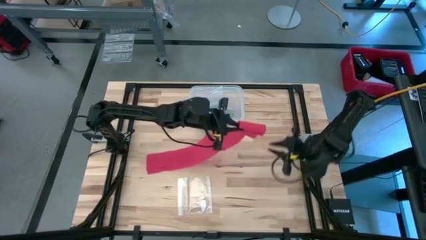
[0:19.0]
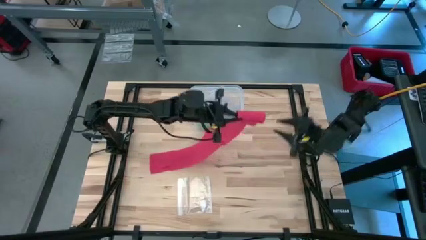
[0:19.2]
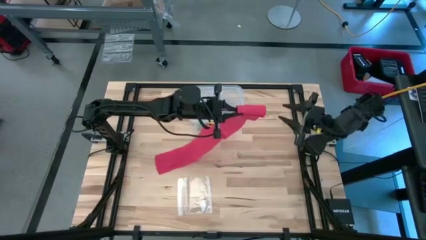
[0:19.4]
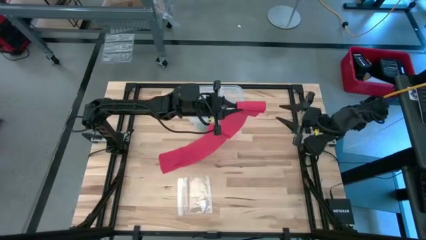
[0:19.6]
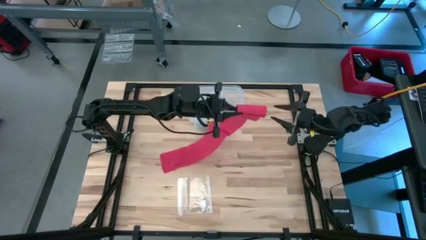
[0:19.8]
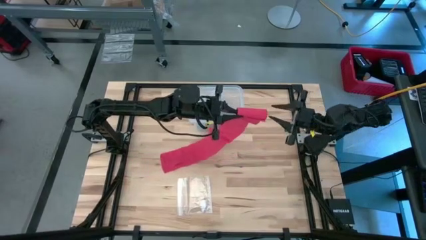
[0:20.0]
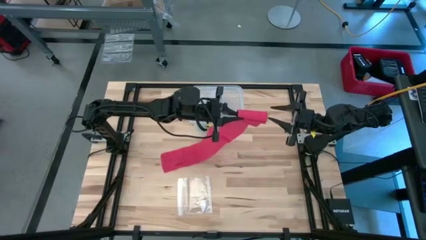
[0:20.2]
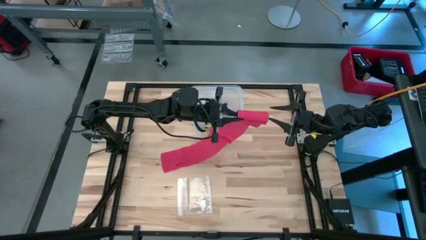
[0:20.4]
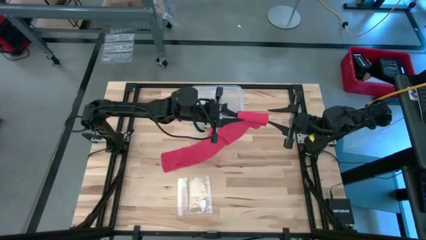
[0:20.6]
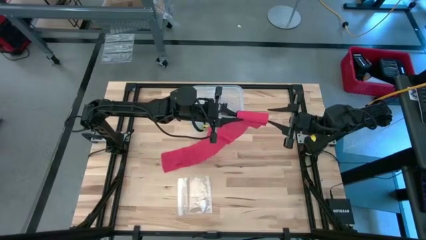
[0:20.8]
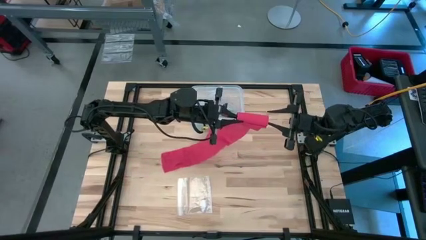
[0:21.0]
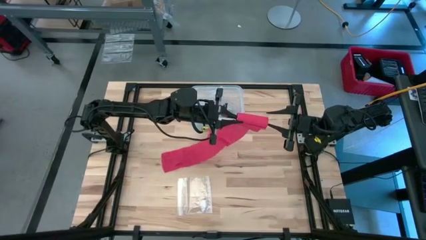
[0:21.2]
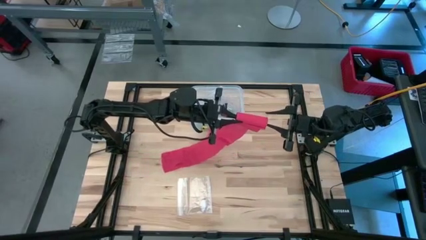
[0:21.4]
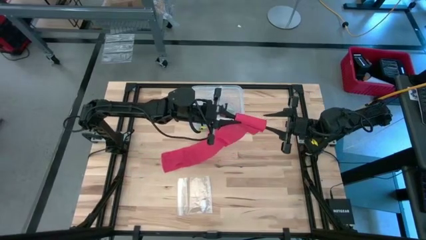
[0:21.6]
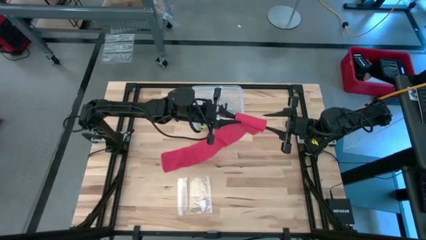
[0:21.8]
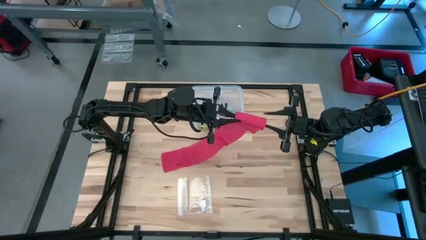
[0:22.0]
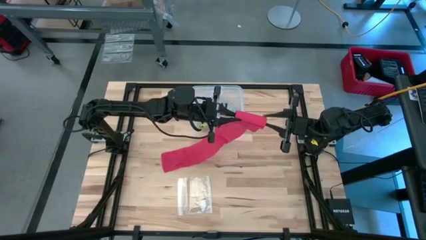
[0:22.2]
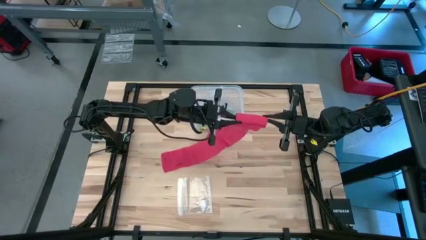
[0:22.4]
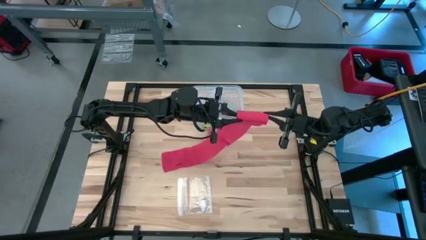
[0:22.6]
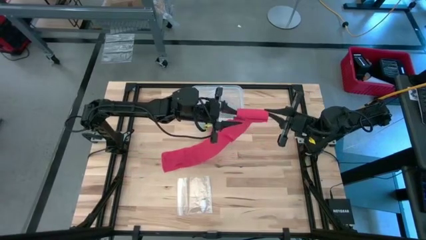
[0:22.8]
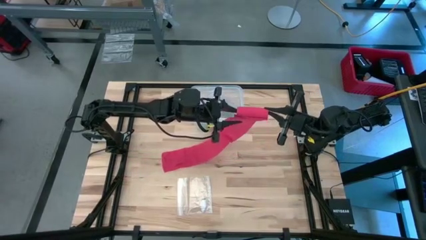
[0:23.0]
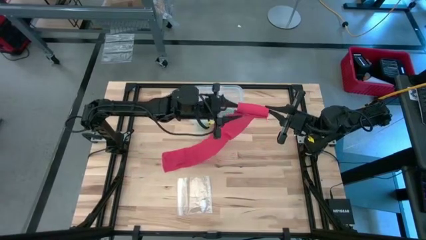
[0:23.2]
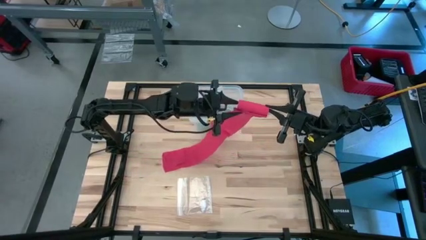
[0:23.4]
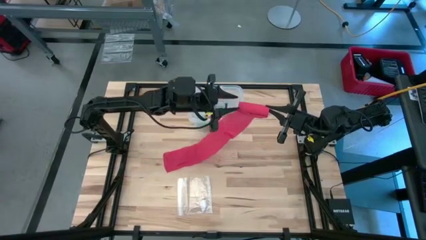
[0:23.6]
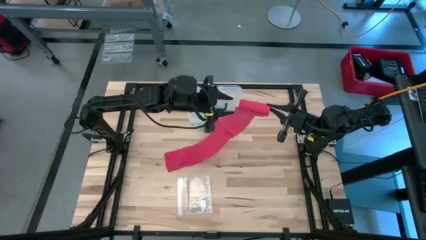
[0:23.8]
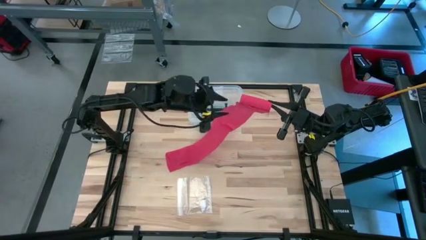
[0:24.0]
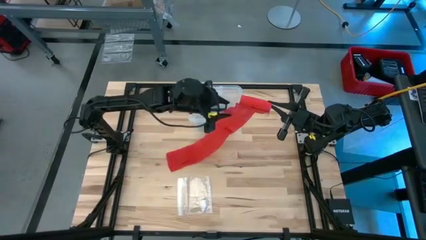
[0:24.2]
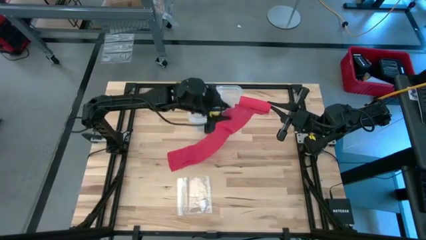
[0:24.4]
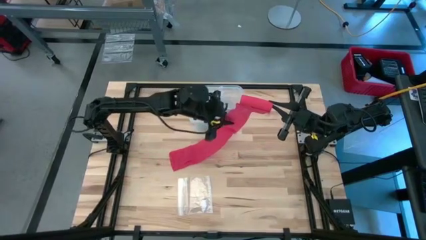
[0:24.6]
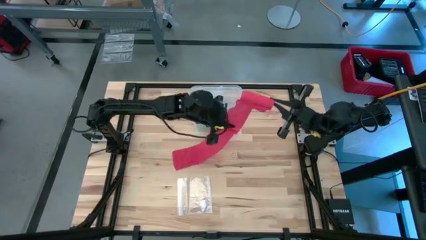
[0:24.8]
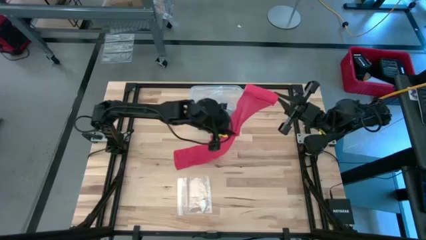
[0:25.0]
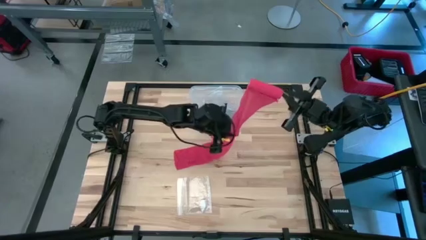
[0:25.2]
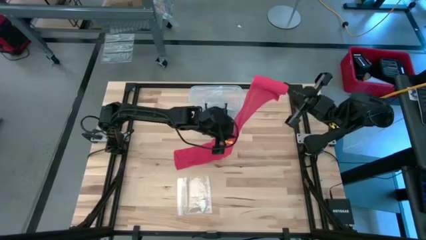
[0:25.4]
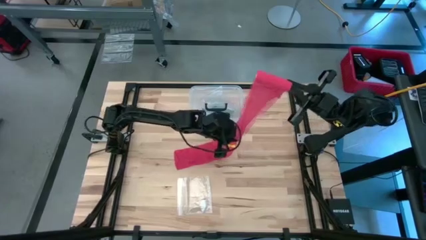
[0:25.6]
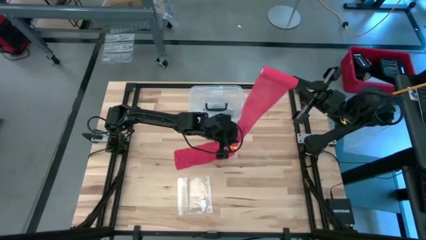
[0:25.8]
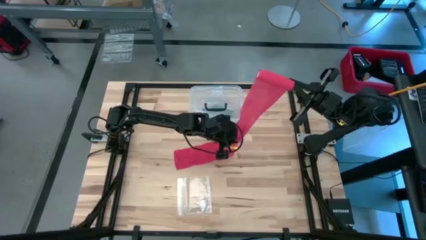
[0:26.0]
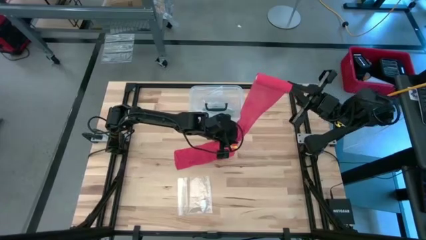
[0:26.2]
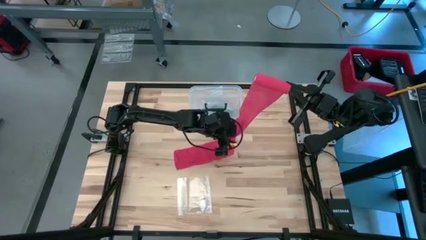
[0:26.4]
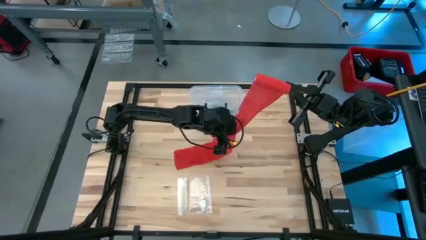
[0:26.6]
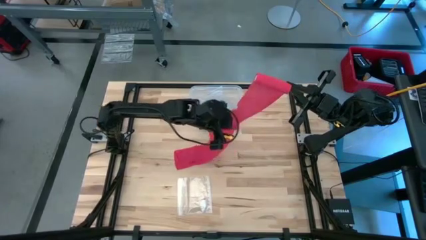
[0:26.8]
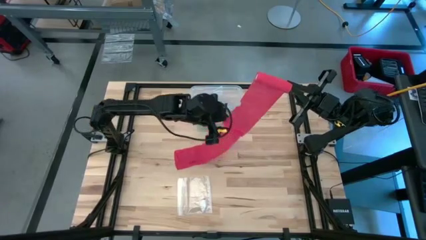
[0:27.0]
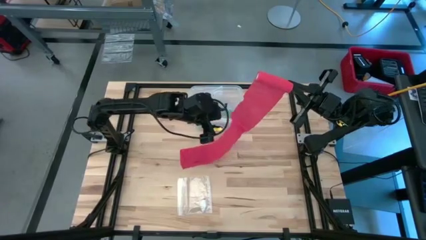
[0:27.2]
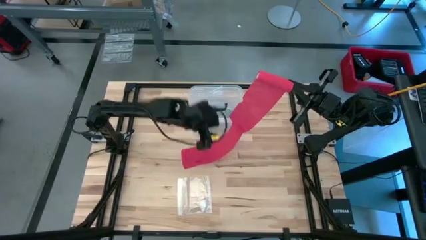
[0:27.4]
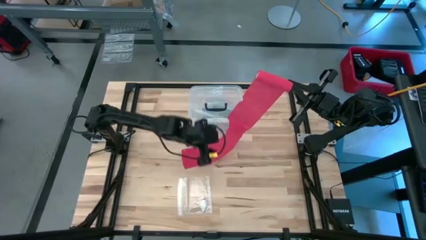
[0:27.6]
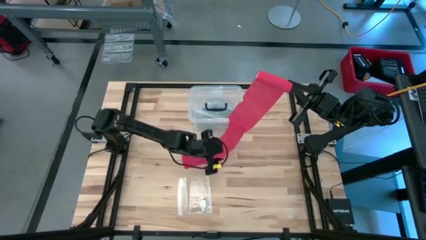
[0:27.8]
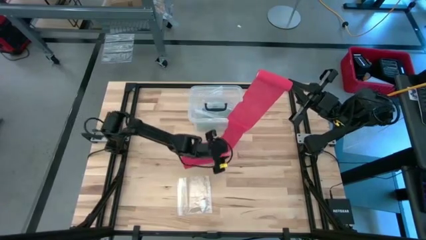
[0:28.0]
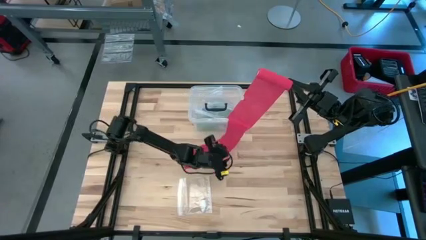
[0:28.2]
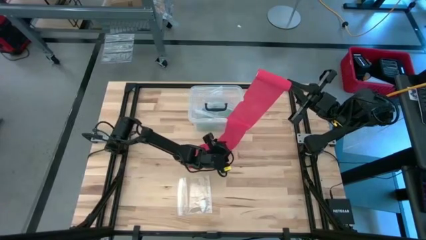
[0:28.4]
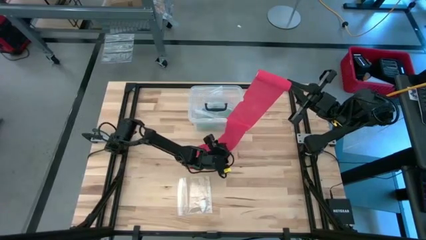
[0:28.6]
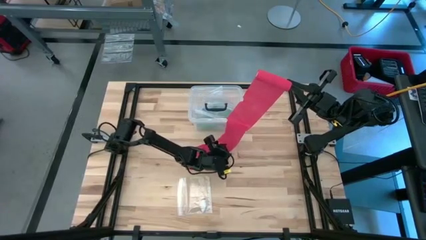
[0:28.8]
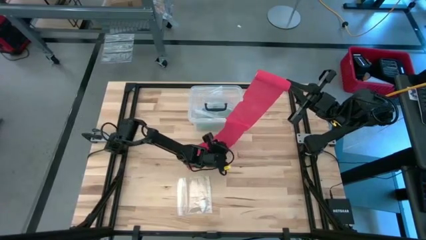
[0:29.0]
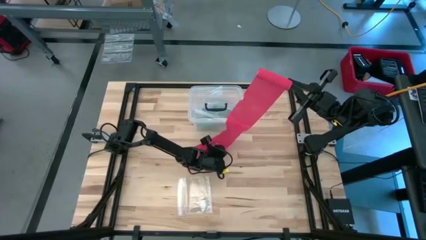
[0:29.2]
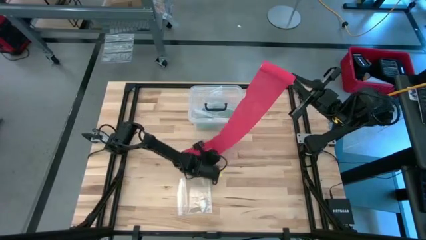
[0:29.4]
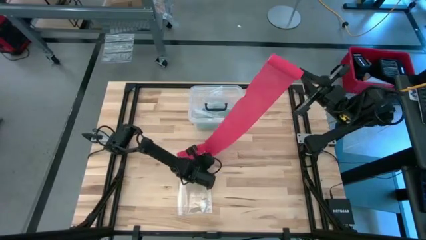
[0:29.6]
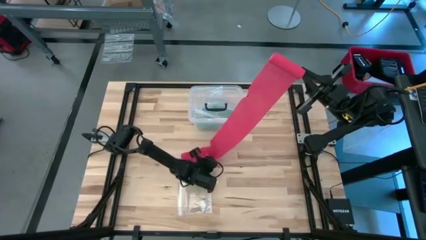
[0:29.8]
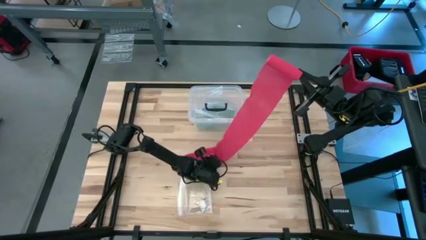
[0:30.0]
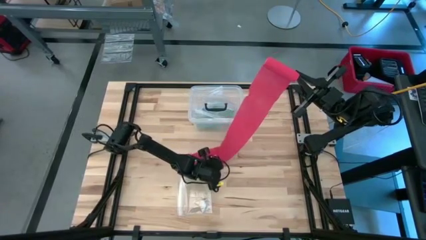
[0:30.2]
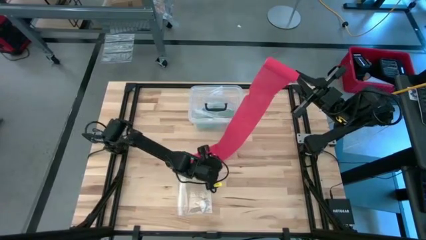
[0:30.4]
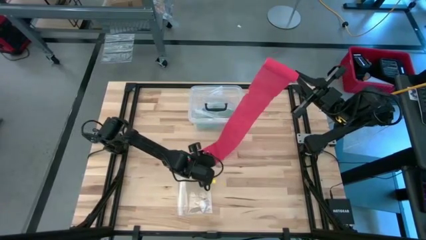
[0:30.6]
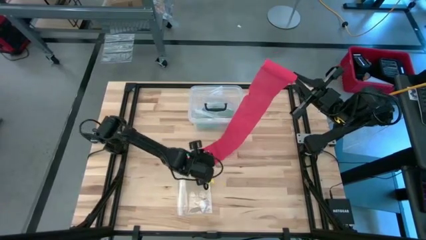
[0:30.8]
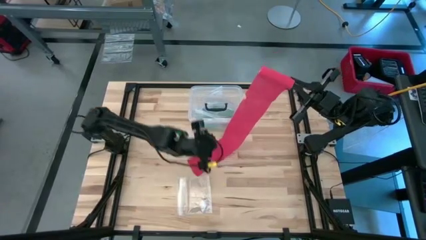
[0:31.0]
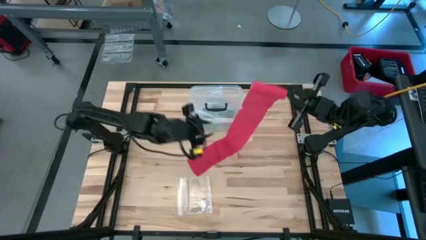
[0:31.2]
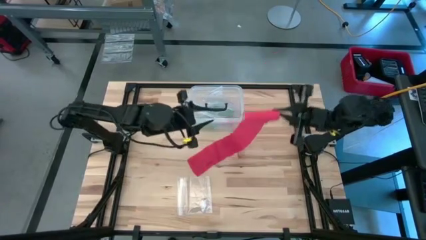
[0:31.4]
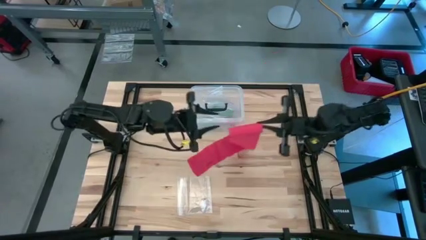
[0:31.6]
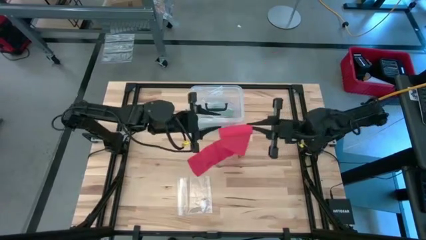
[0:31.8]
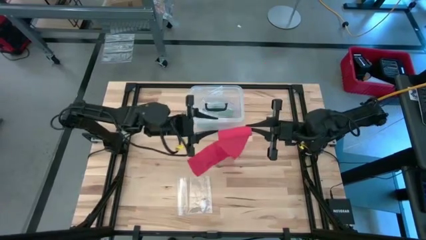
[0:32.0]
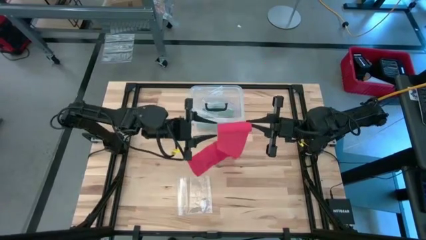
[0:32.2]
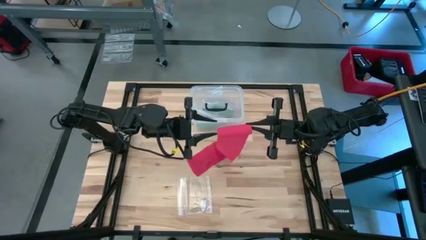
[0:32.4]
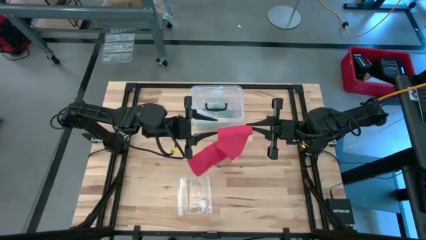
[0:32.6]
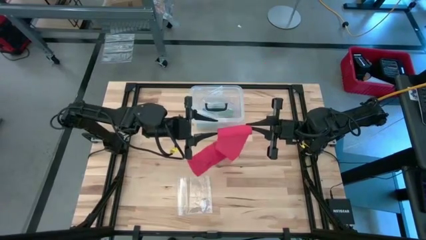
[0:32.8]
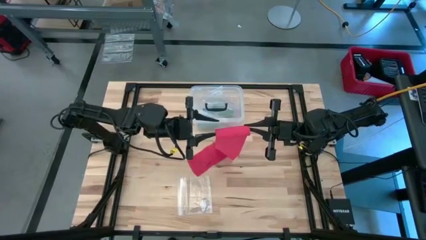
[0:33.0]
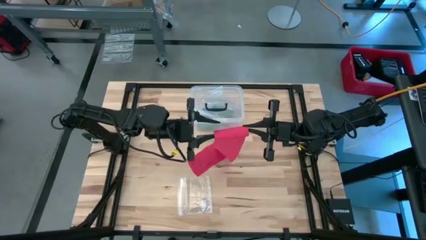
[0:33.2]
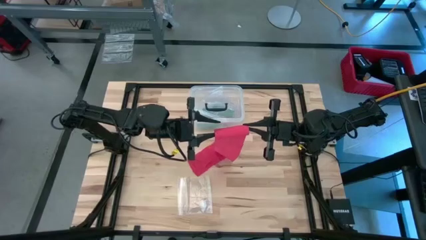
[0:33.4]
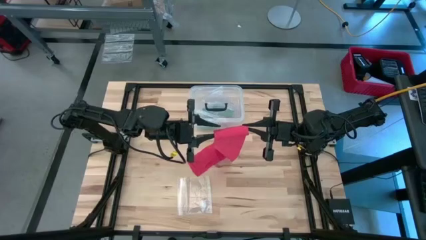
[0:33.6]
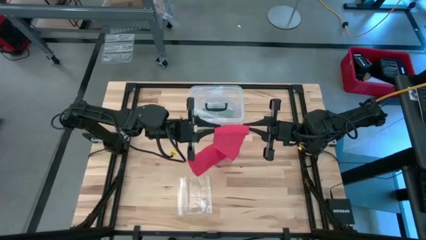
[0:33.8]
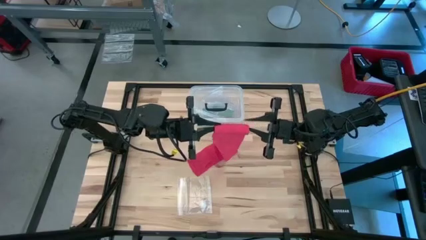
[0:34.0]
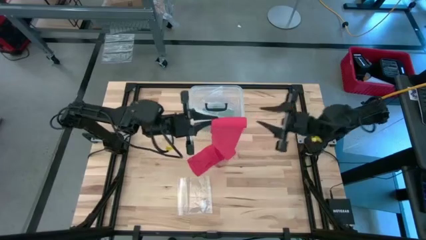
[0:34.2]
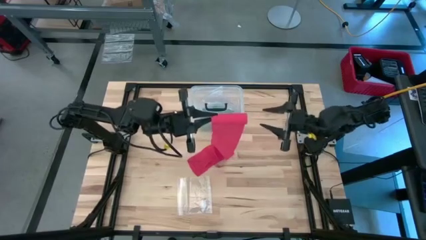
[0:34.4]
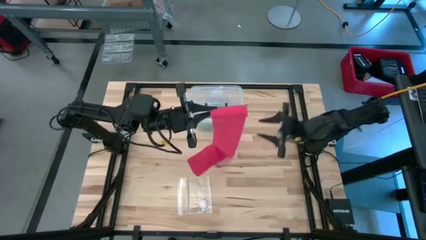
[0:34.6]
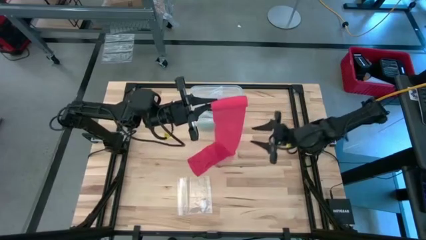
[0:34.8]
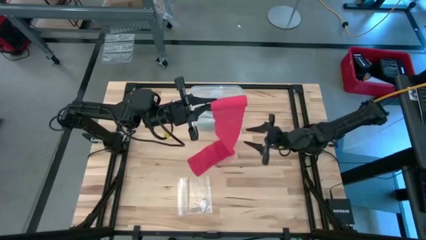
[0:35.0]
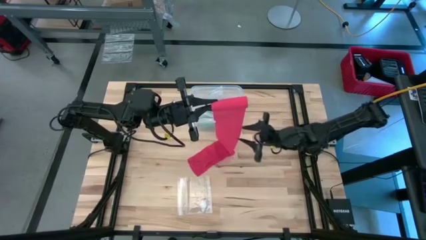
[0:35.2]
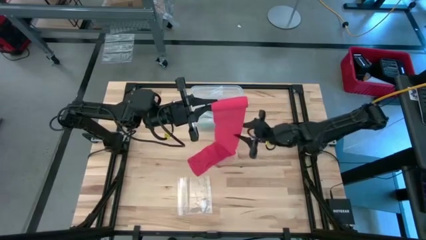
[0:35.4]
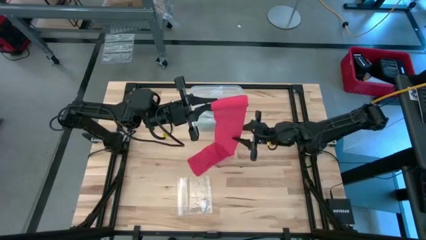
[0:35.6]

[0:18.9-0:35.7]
Task: Roll bandage
Roll the red bandage
